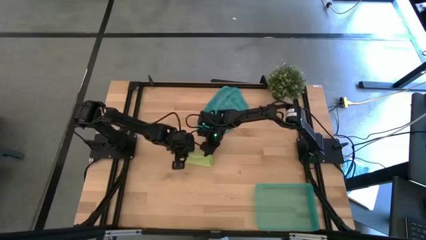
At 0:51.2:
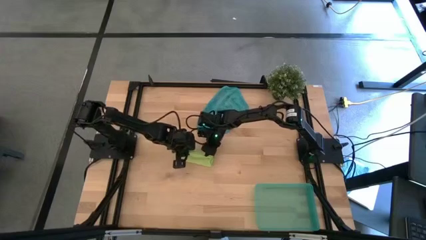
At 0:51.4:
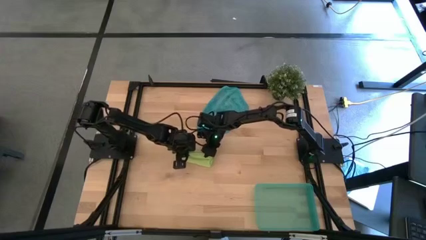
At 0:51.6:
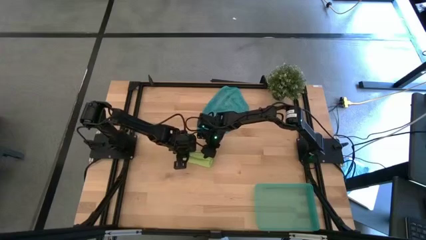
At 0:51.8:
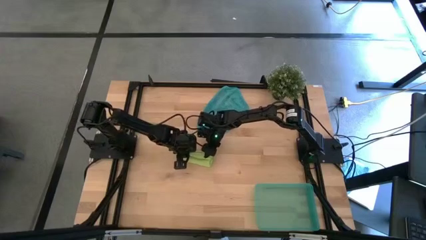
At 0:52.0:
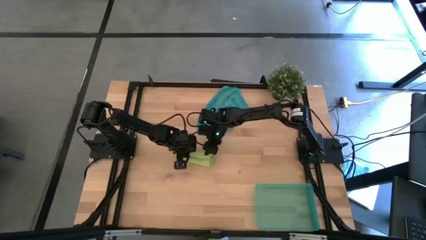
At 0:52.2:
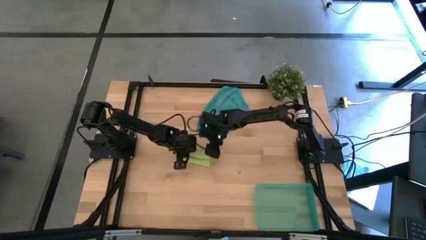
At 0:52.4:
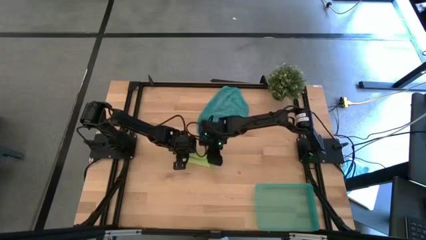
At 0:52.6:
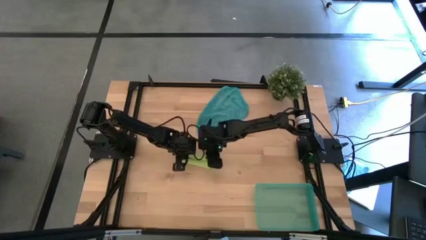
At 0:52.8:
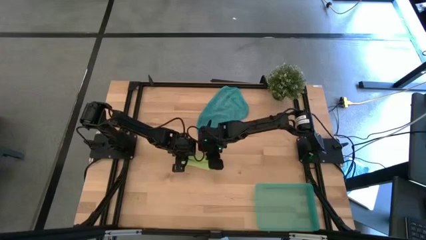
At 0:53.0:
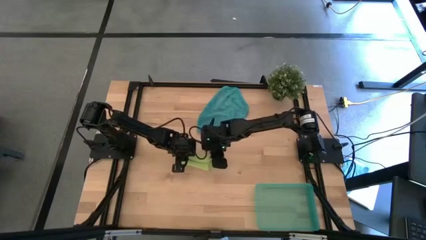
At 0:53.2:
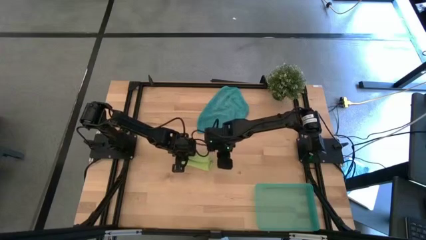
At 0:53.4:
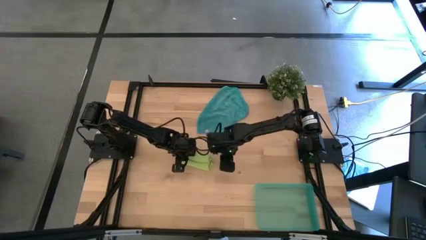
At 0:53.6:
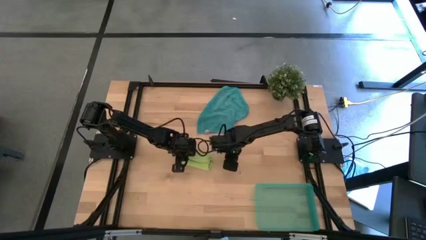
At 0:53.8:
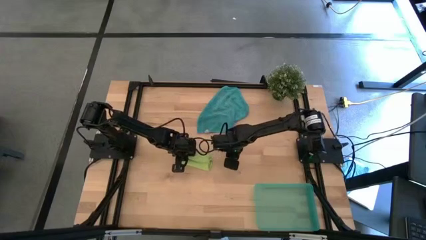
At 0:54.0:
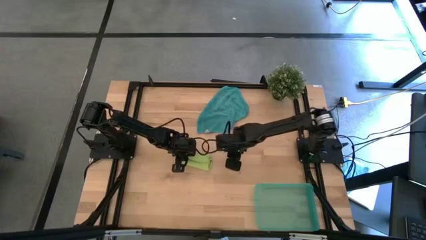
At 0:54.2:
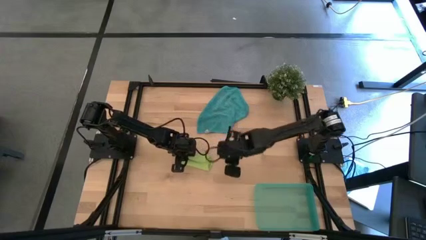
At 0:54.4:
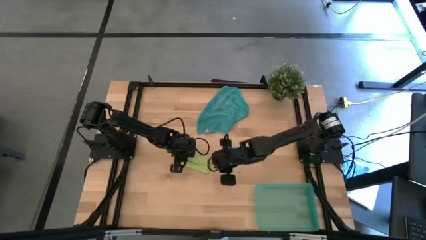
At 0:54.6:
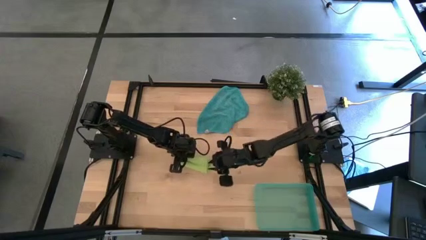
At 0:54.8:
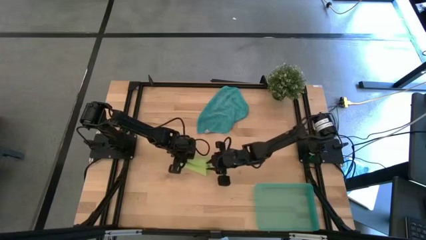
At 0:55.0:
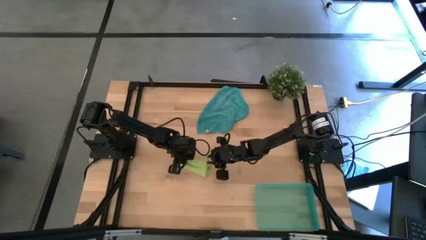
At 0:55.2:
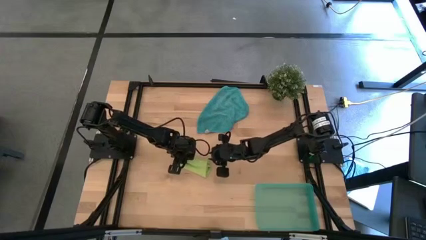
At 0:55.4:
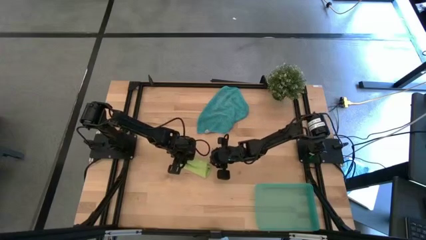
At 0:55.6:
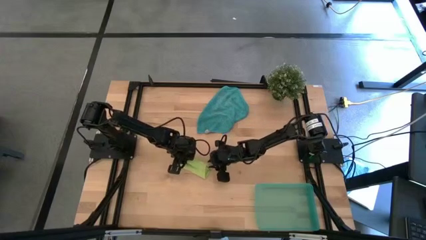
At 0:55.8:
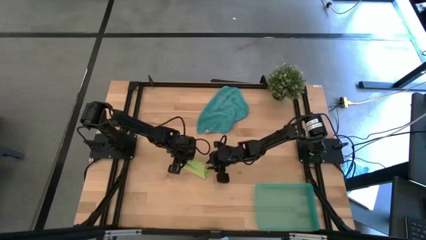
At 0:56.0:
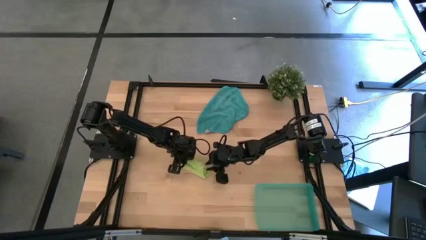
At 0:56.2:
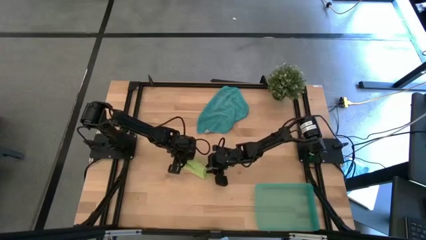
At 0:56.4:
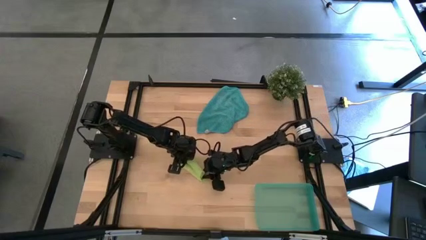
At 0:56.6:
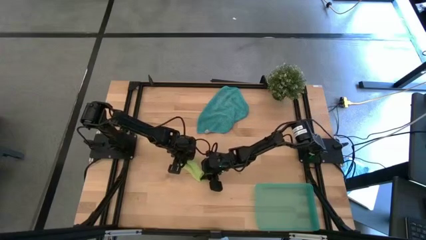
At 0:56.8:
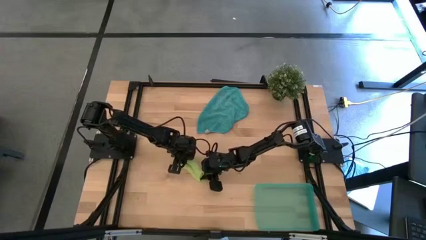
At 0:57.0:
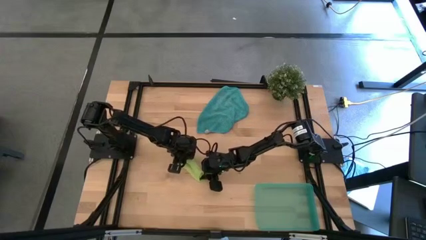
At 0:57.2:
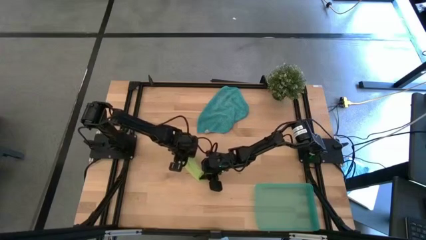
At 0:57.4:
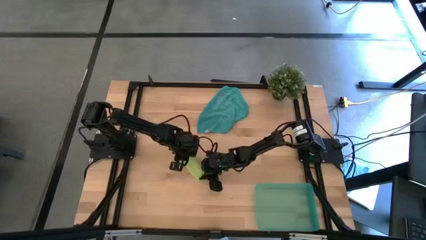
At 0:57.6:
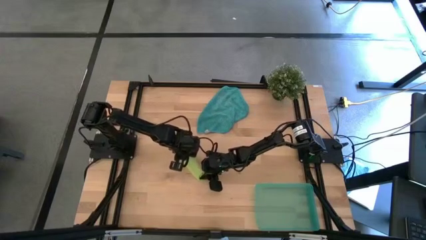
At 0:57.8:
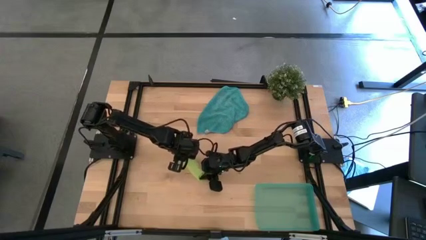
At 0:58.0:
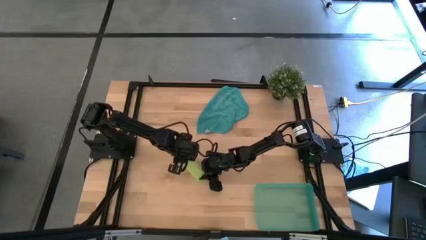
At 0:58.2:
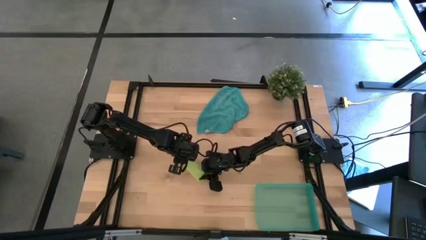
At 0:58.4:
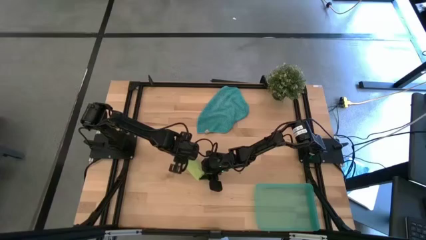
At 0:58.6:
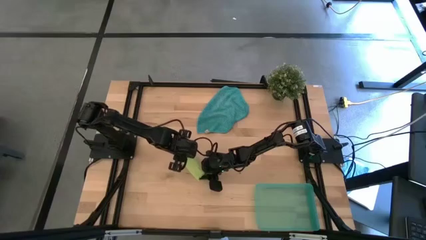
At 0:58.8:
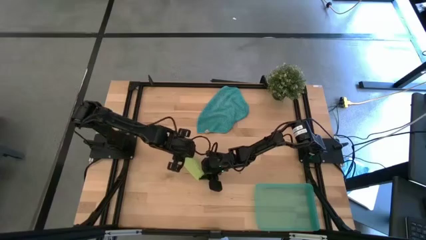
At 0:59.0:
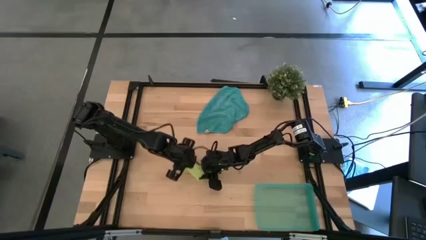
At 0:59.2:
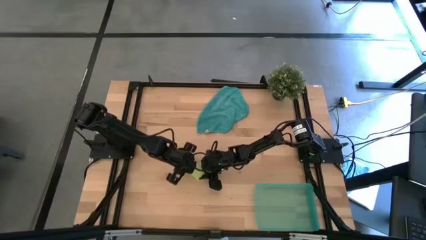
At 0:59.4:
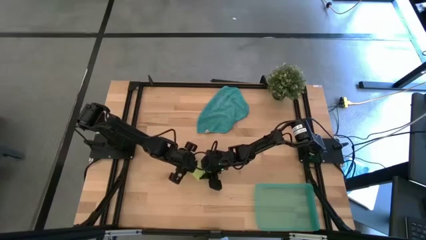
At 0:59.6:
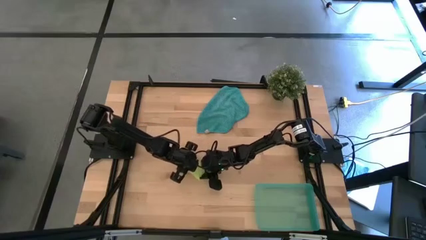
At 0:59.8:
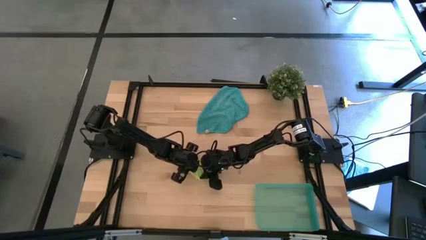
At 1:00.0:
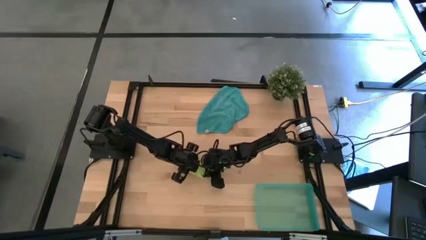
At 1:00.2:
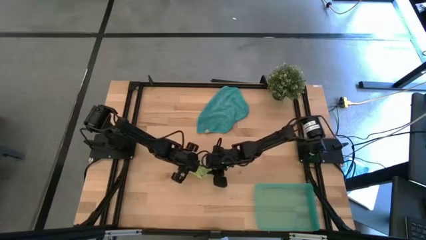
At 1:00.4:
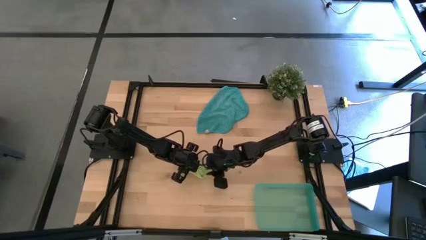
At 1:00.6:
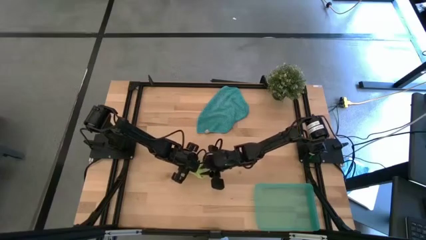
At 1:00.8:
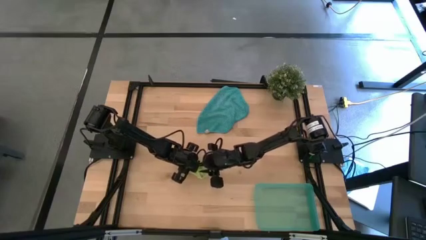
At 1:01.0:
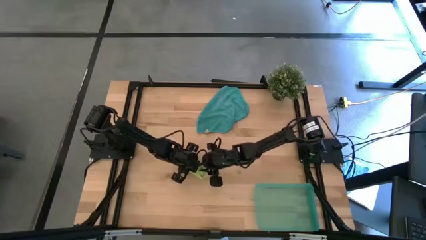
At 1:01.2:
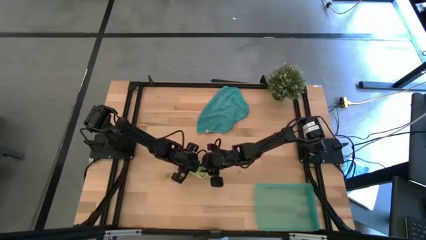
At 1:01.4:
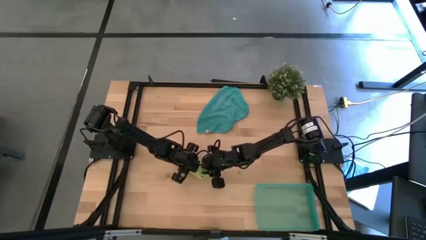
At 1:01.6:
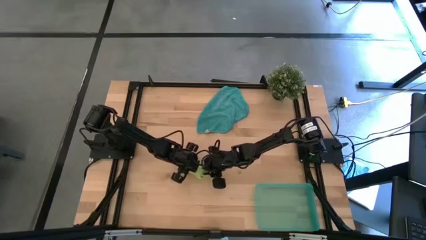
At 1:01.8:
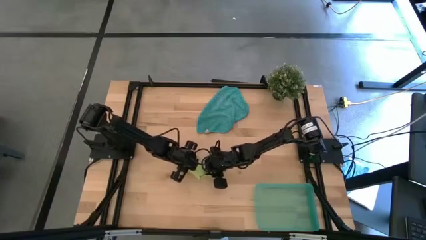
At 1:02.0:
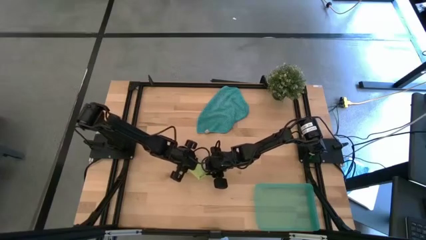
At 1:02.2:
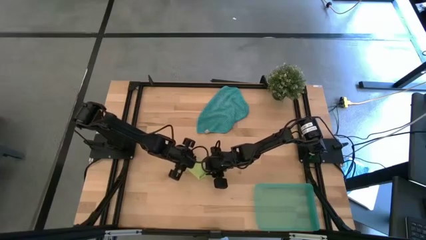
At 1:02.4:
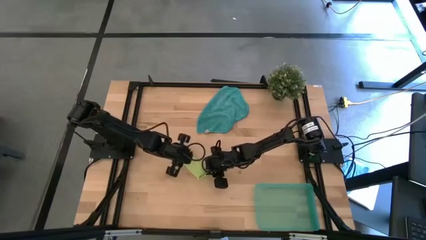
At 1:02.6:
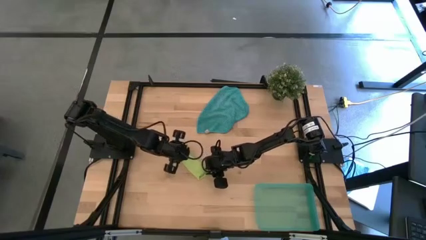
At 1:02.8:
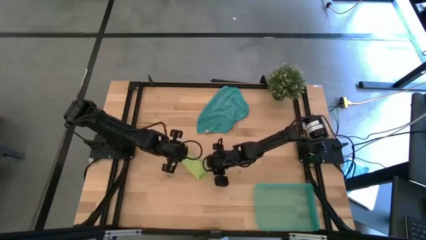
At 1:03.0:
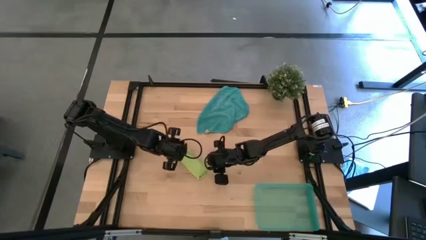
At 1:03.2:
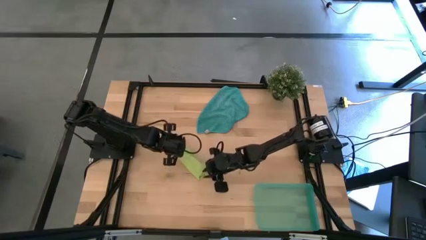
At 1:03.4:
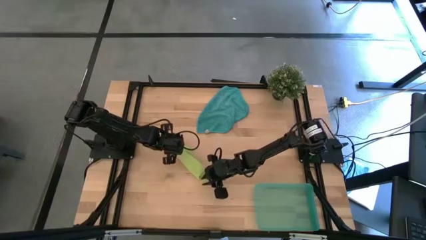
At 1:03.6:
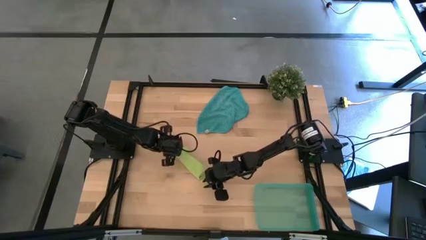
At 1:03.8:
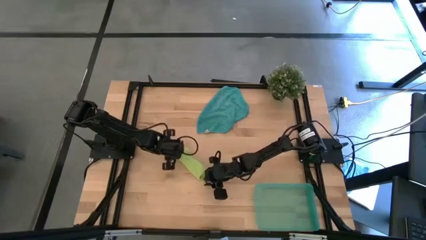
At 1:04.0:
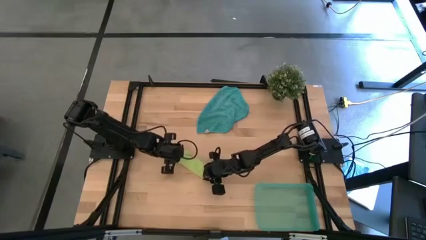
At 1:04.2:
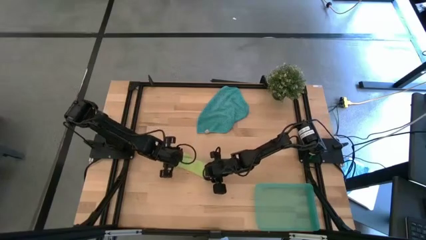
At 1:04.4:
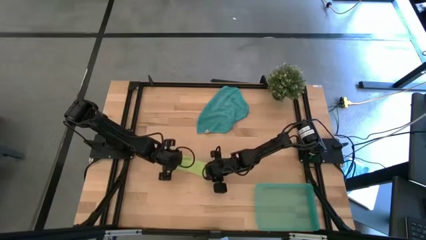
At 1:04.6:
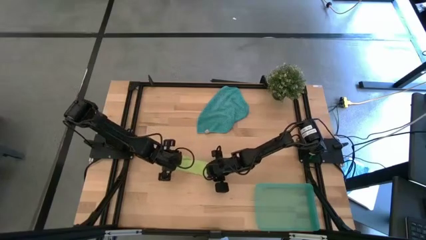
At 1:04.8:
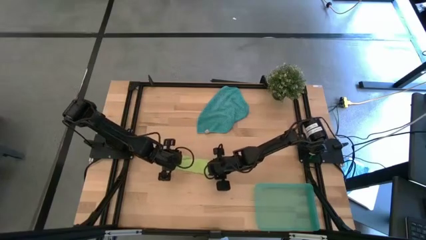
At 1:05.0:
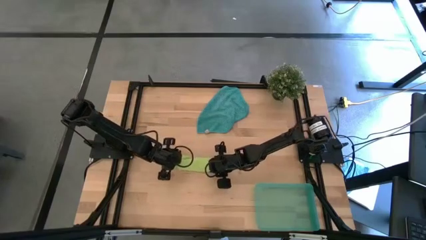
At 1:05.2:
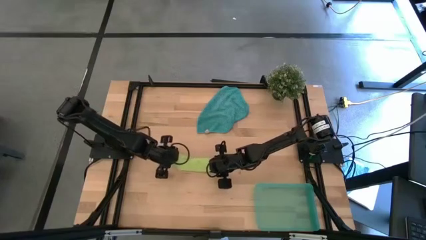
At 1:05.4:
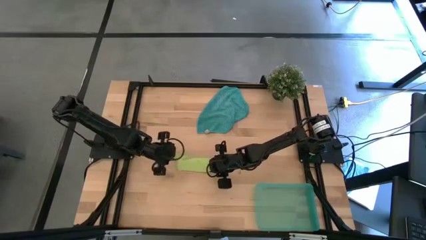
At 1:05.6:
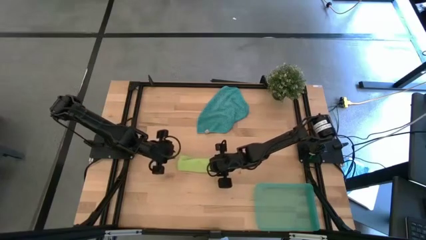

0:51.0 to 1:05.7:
Task: Roll microfiber towels into tight, uniform cylinder then place into a basket
Roll the green microfiber cloth
